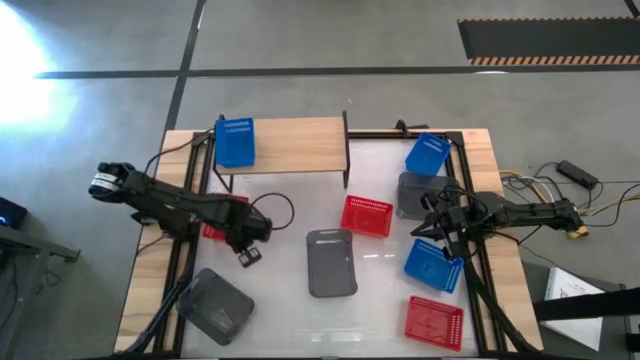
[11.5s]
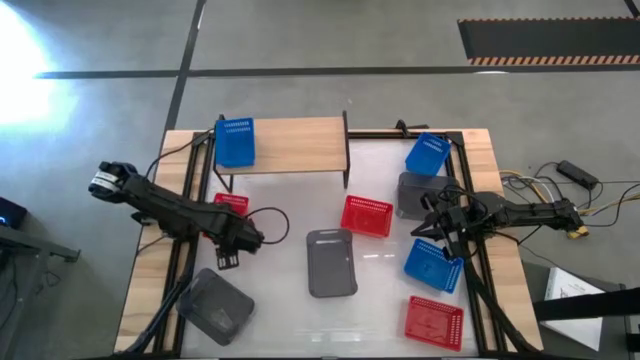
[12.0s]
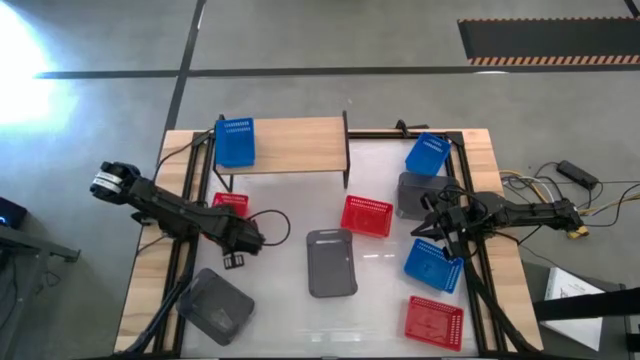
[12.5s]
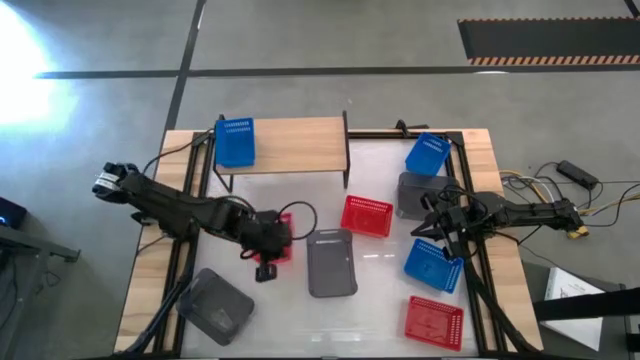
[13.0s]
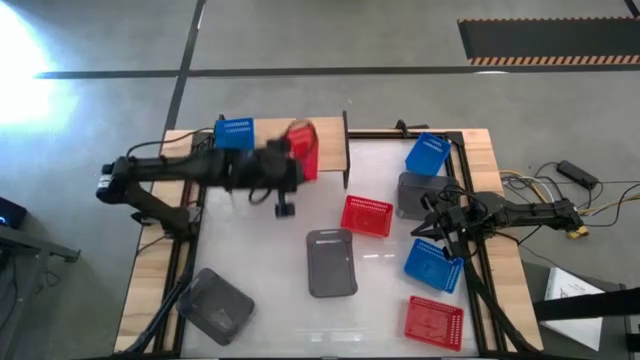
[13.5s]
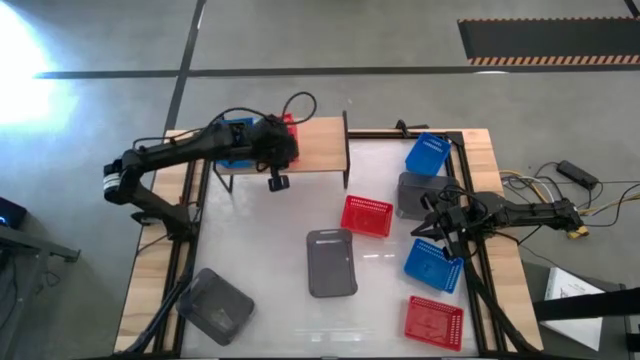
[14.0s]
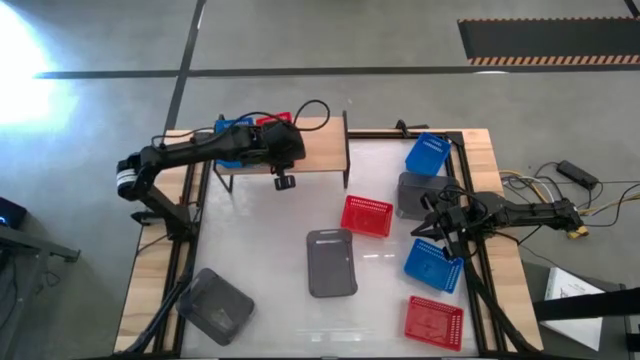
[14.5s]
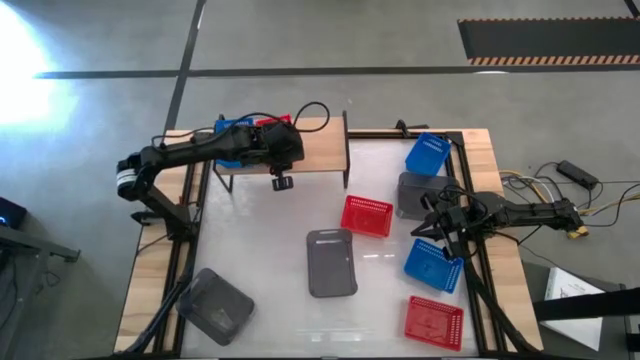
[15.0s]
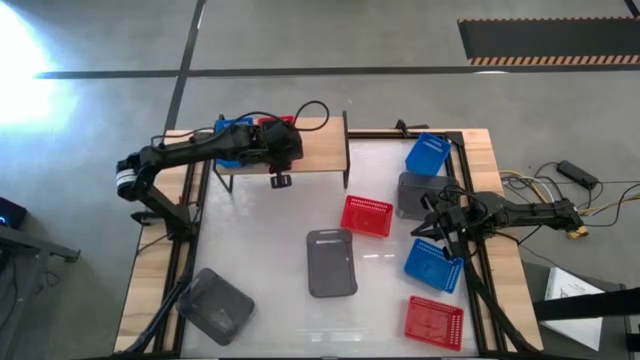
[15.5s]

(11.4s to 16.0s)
Task: Stack baskets on shelf by color
Put the top left red bin on the shelf

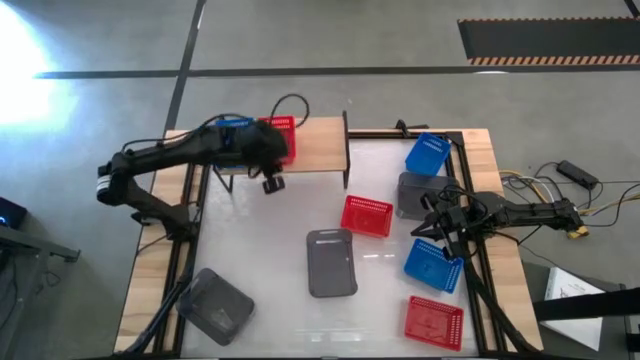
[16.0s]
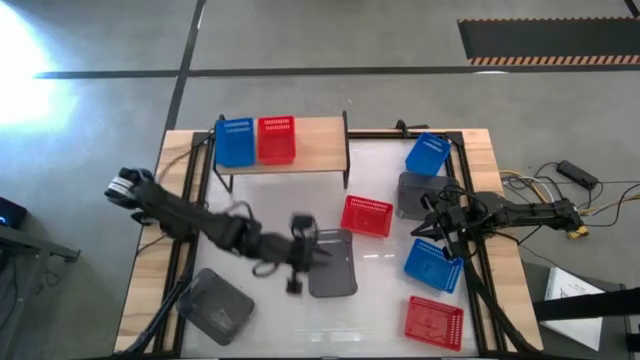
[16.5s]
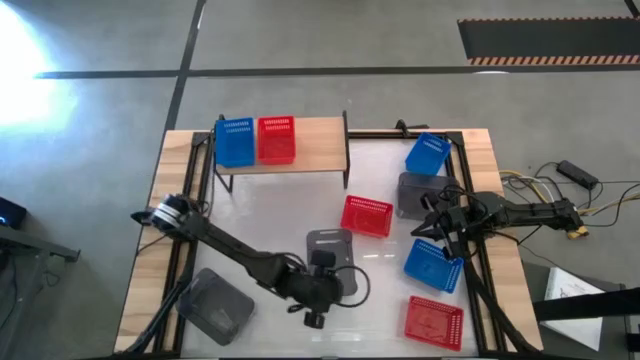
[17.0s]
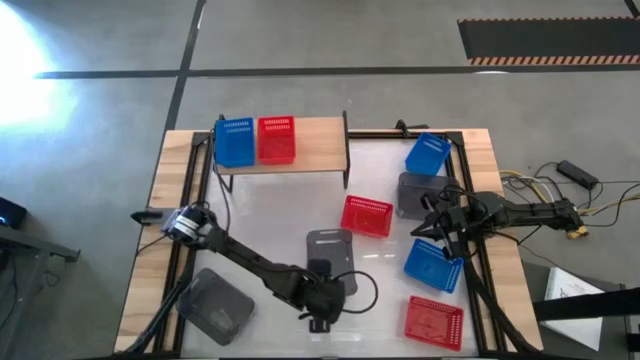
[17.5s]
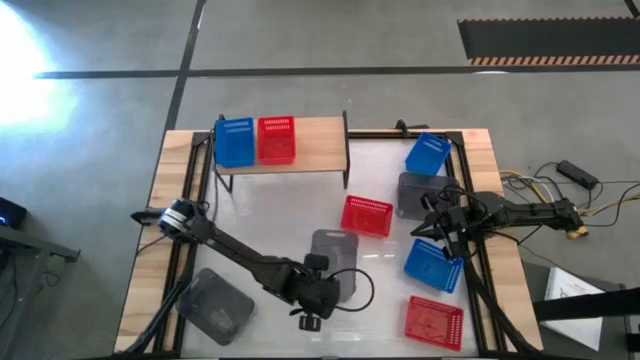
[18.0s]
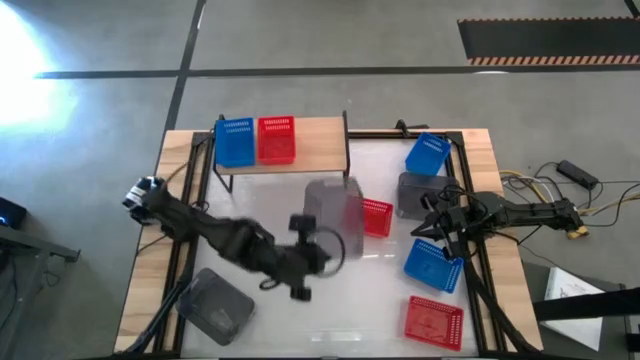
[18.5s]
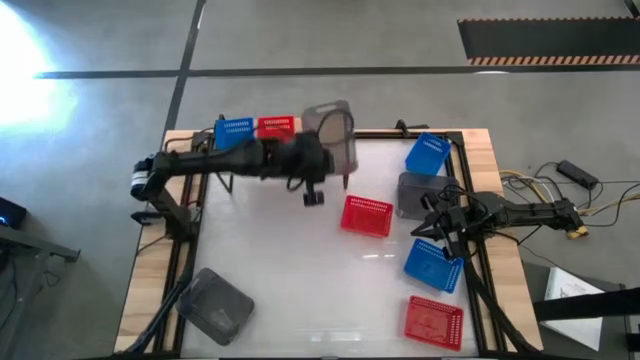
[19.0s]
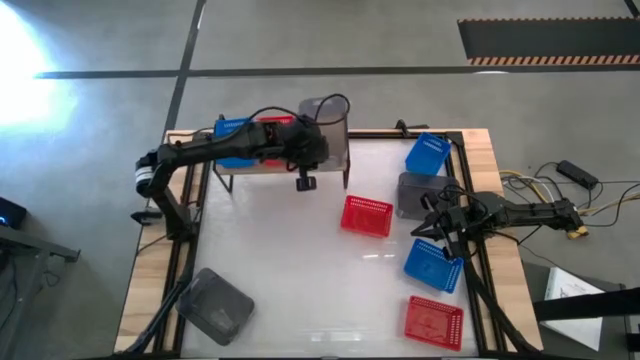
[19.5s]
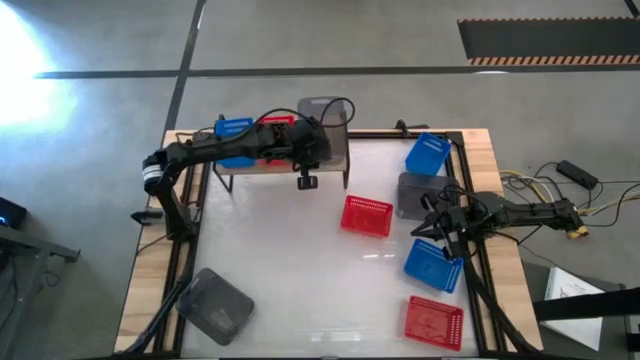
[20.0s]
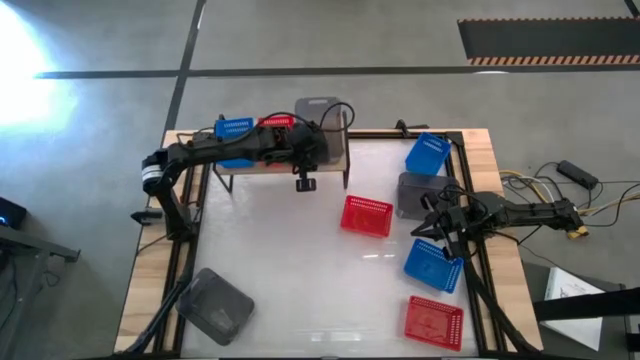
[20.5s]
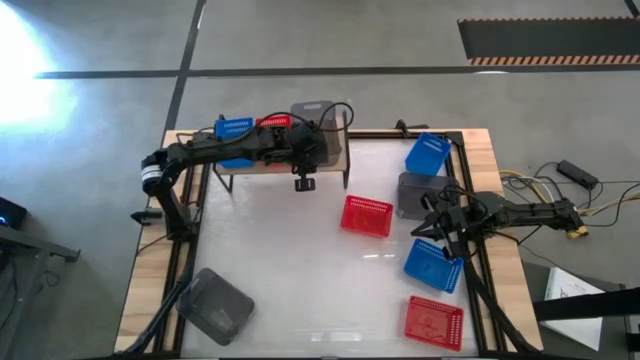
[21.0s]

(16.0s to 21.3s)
Put the middle black bin on the shelf

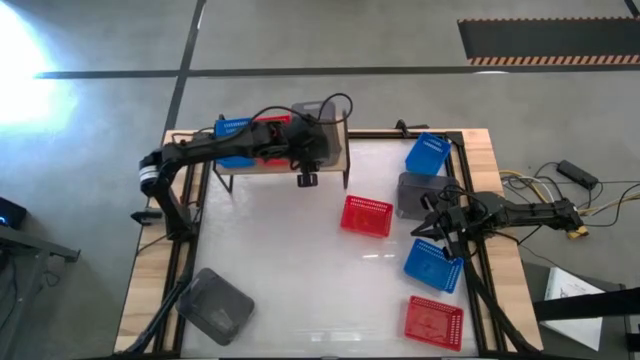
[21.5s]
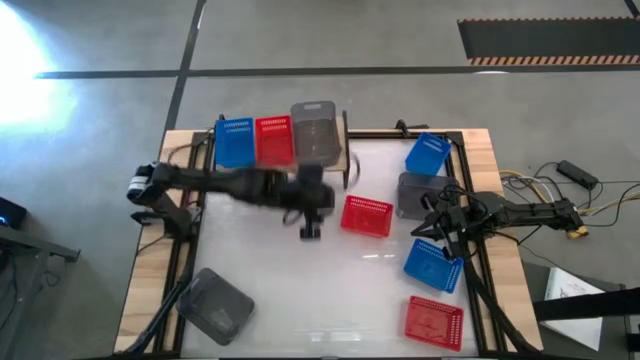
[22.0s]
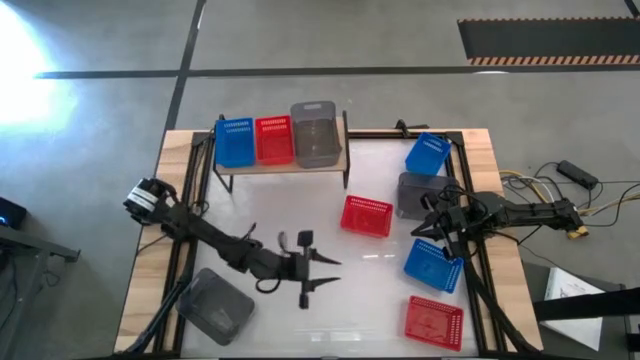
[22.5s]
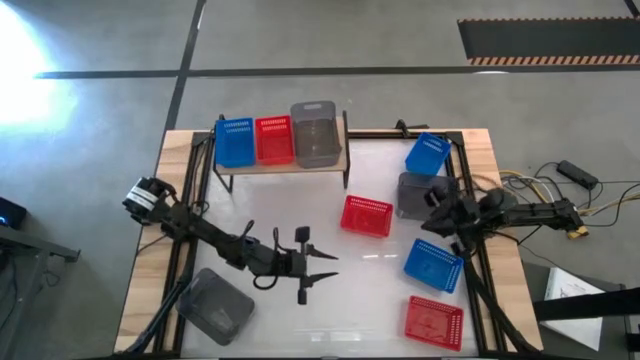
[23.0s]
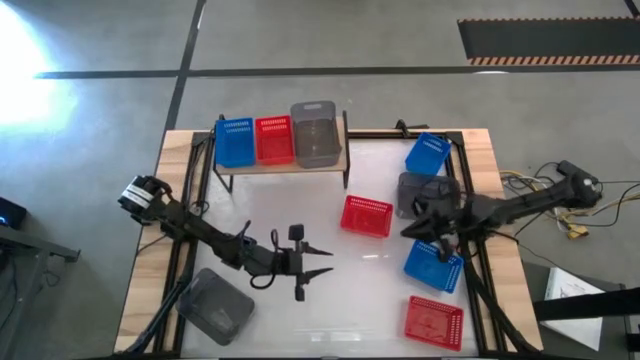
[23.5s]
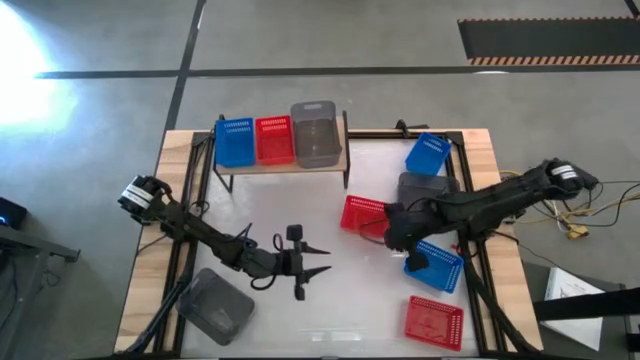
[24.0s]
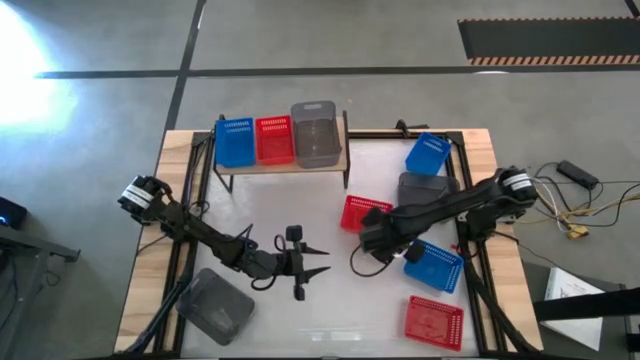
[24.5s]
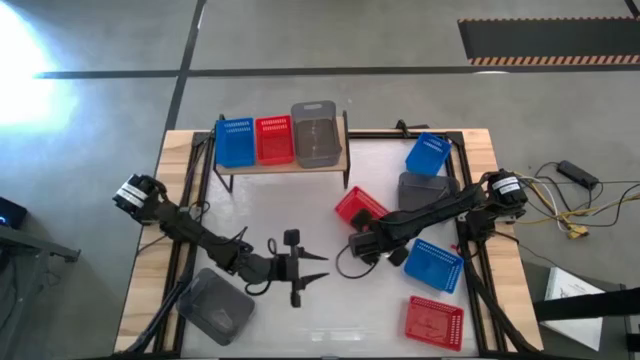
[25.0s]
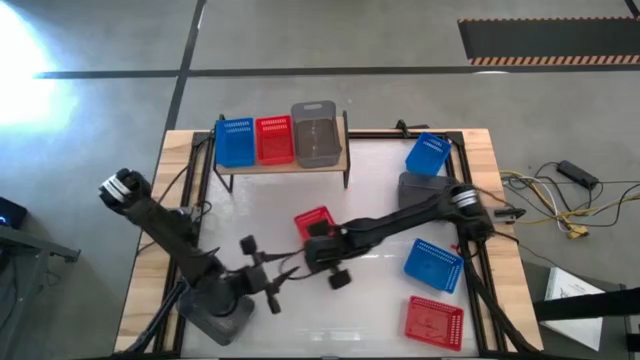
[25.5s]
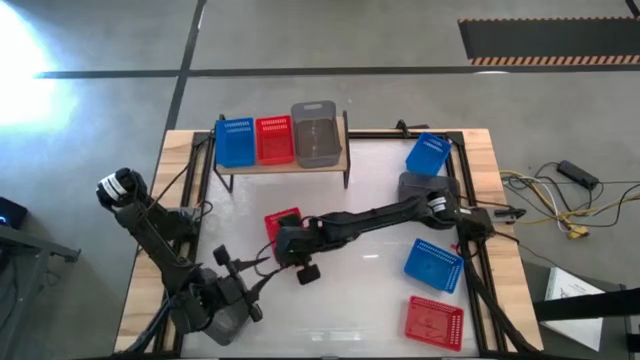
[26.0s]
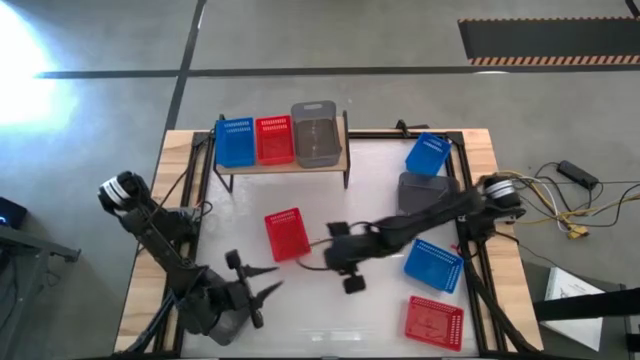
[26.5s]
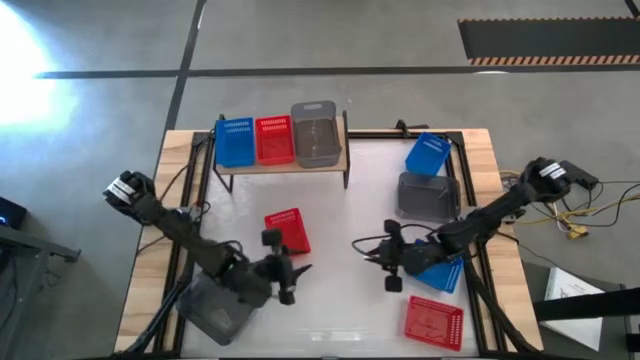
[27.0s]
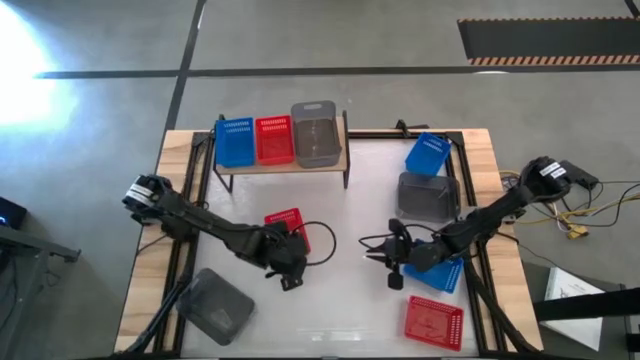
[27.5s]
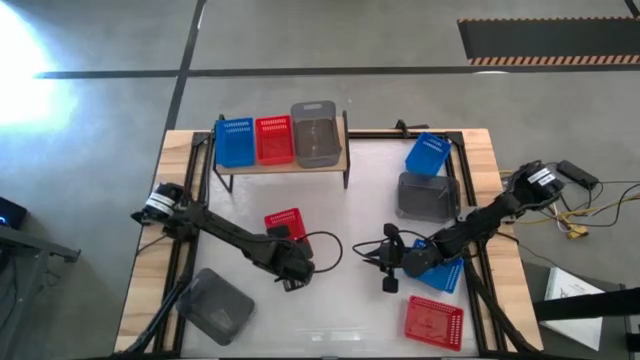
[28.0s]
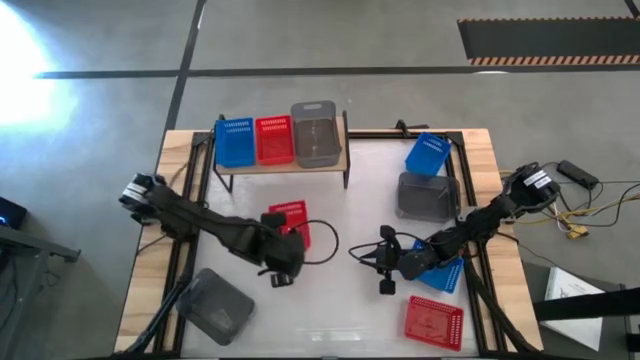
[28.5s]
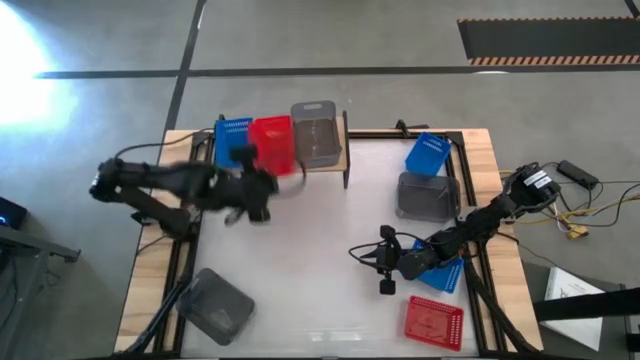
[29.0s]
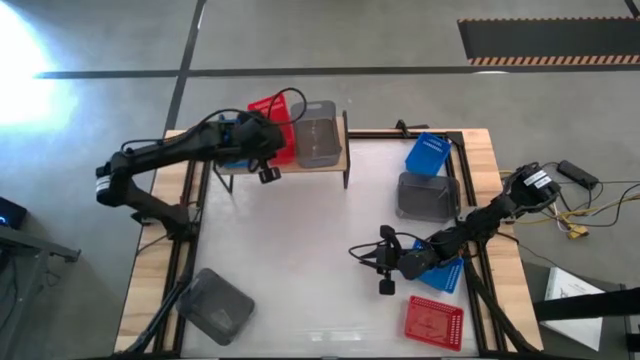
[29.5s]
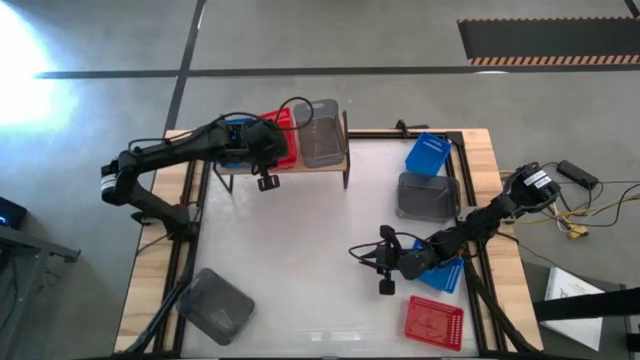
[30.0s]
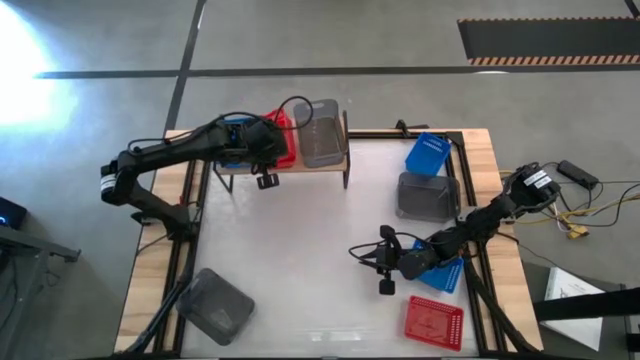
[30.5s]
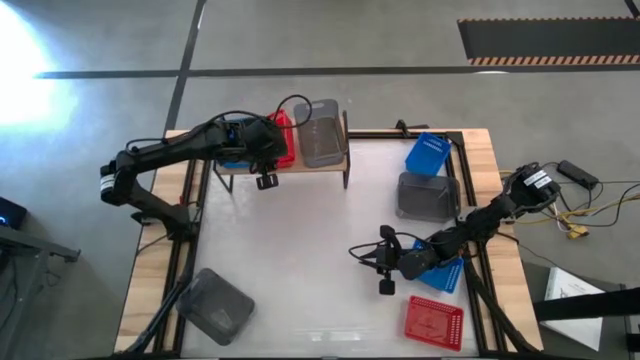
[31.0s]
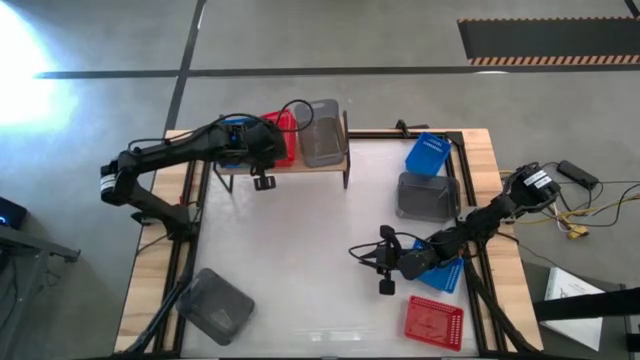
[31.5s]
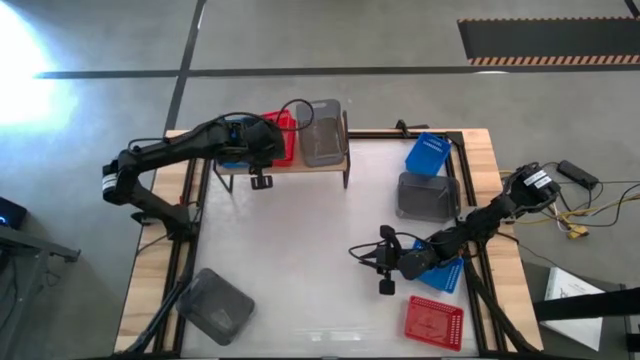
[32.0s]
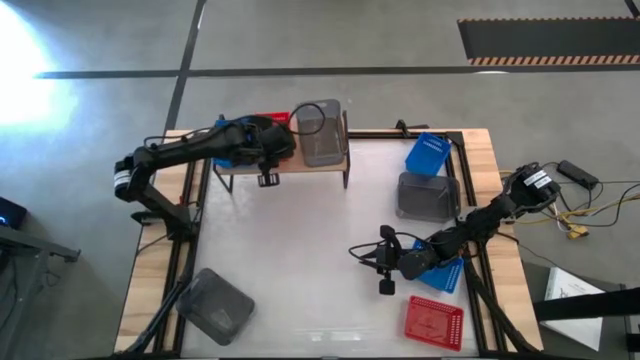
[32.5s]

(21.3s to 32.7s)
Stack the top red bin on top of the red bin on the shelf
